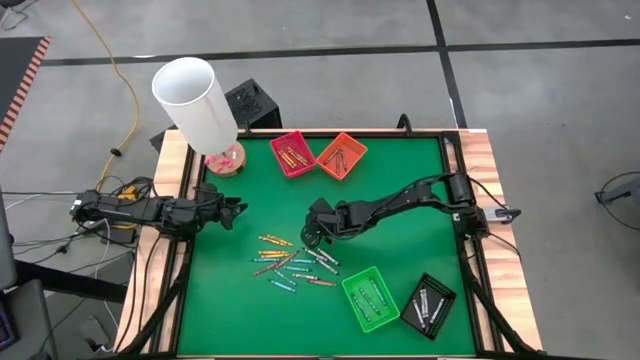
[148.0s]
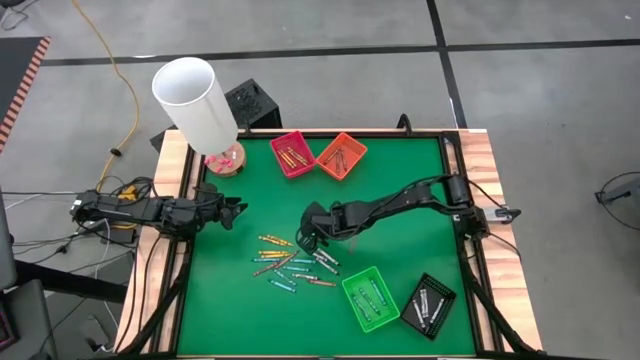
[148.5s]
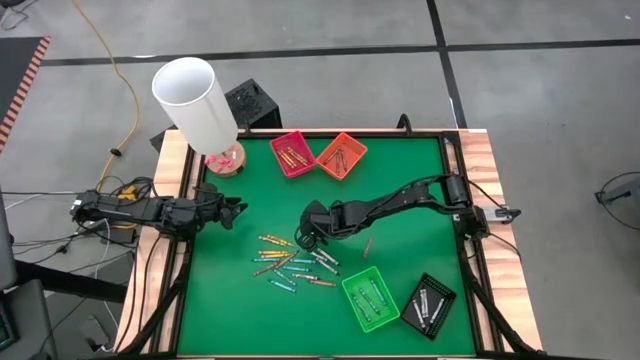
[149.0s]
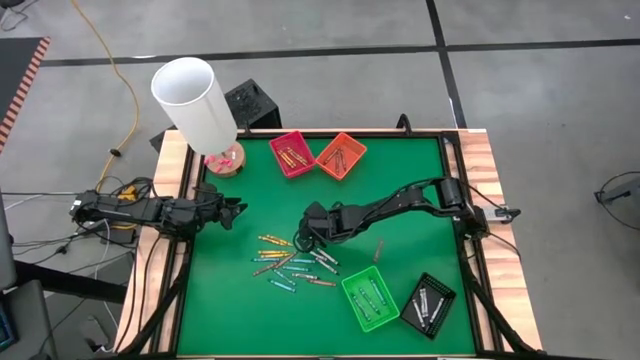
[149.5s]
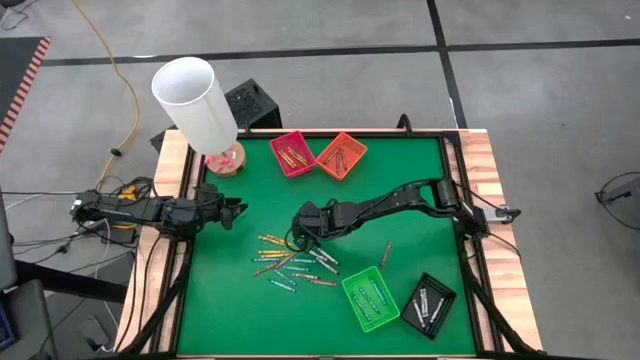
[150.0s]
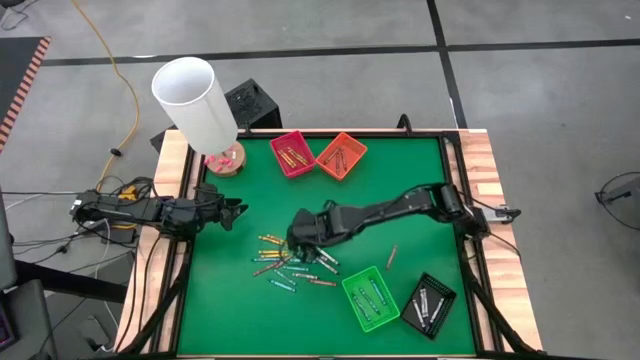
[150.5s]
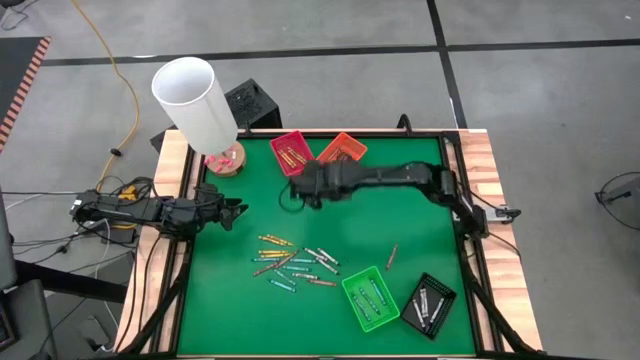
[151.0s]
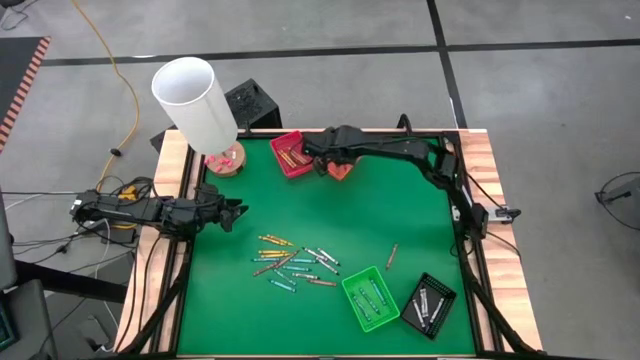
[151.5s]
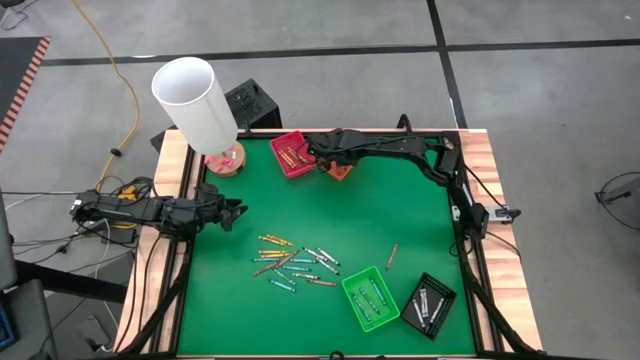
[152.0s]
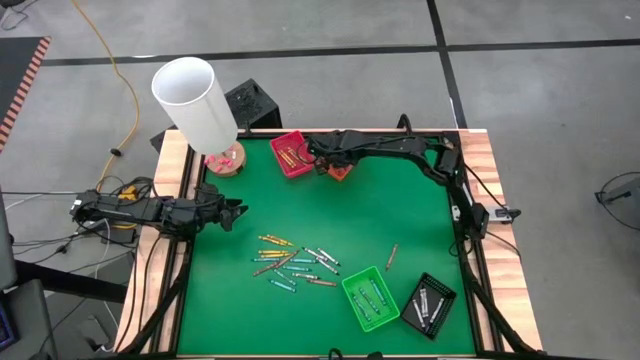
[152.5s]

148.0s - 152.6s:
Task: Sort crayons
Put the brown crayon into the orange bin

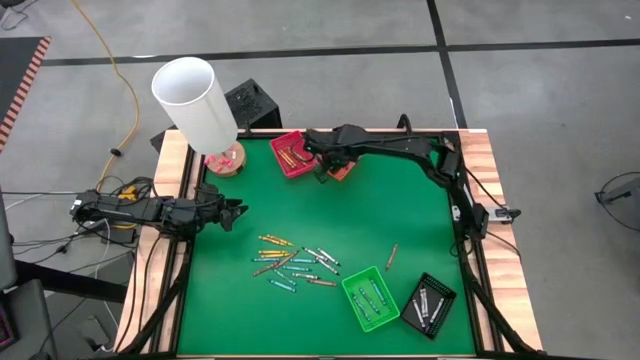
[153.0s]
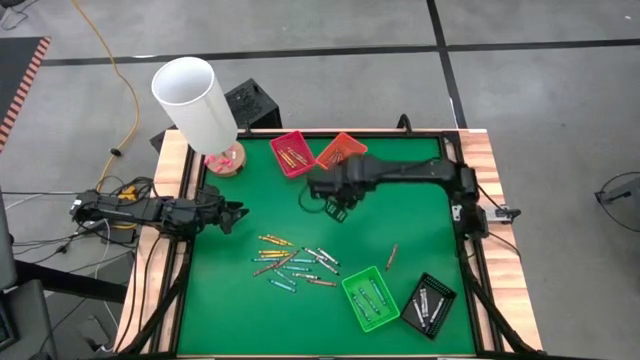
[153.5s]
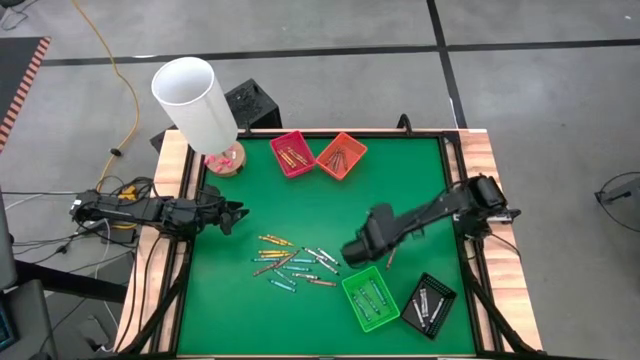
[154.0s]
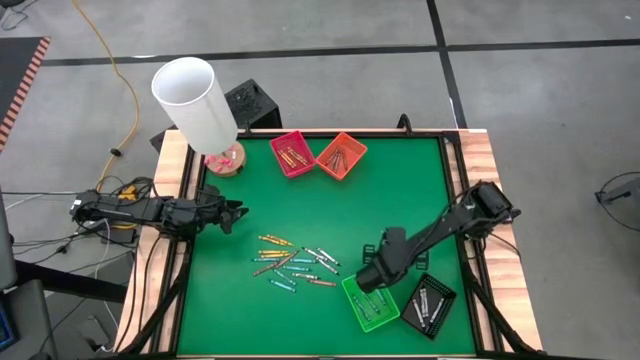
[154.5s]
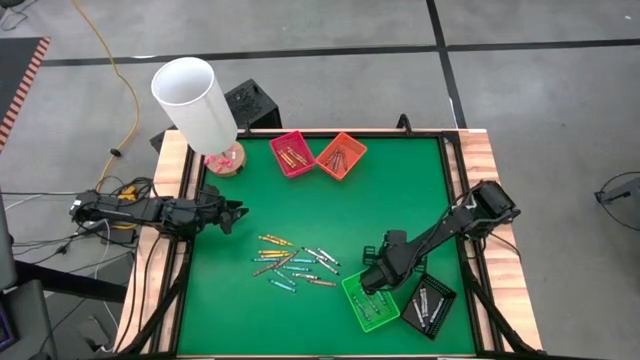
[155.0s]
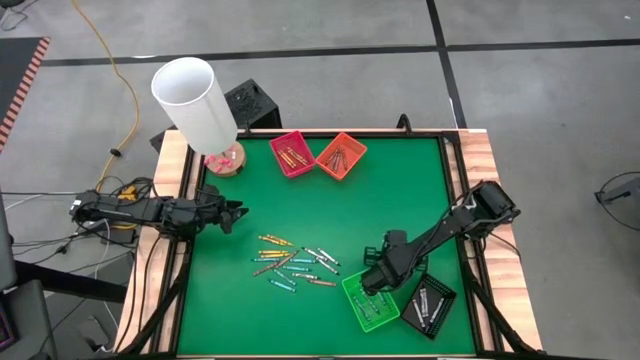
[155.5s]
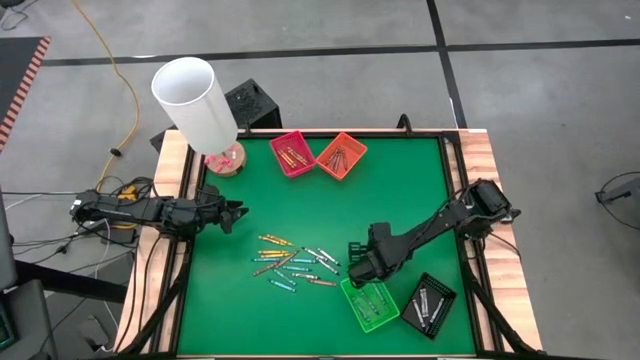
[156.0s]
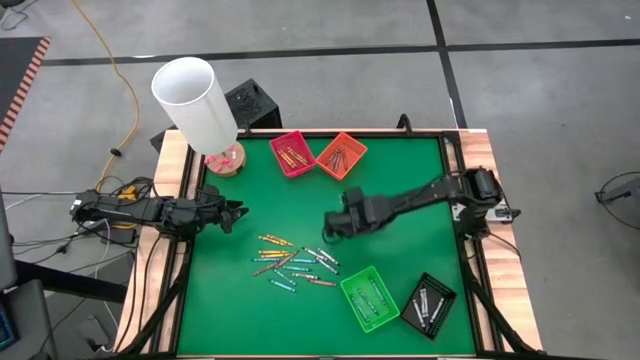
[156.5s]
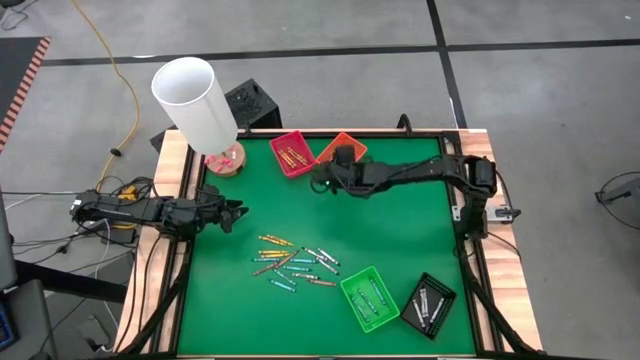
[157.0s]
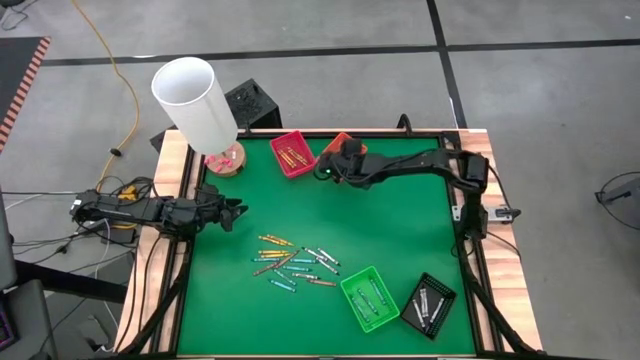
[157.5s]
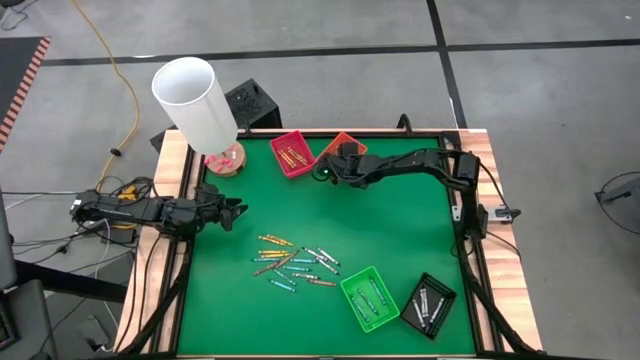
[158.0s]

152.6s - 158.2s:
Put the brown crayon into the orange bin

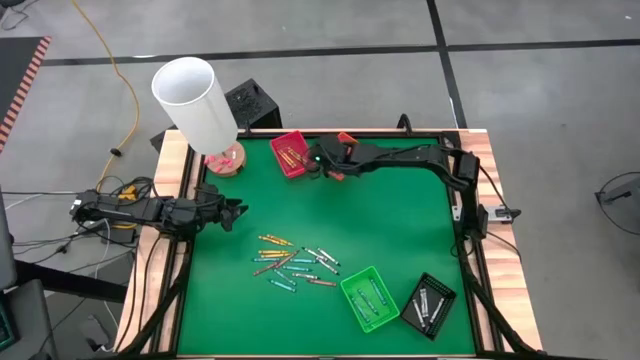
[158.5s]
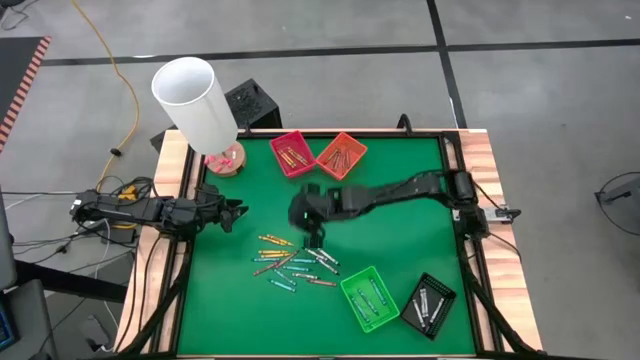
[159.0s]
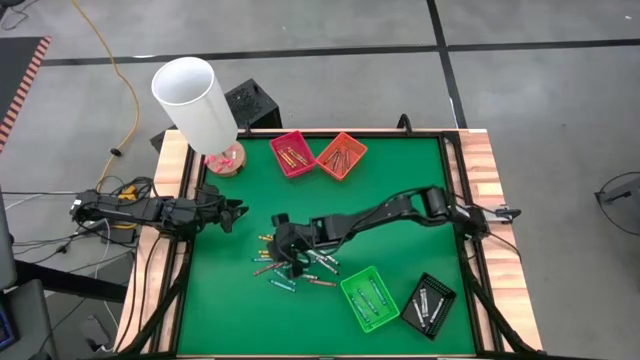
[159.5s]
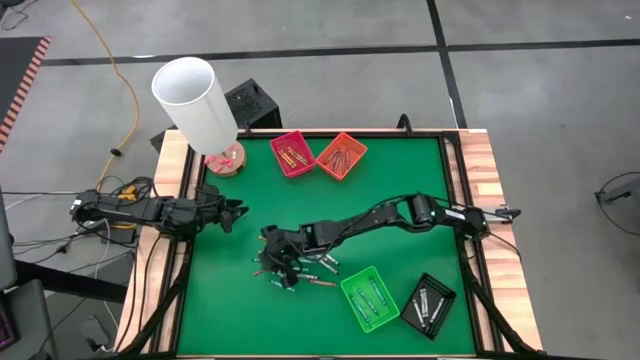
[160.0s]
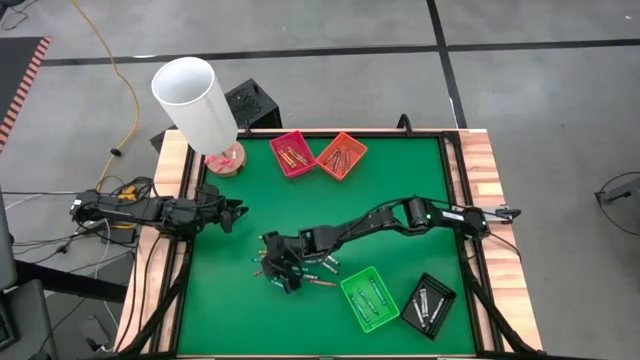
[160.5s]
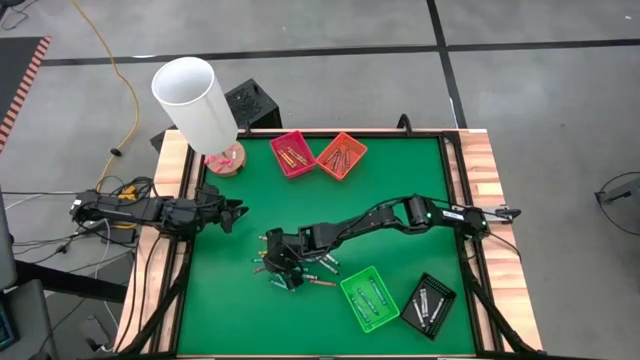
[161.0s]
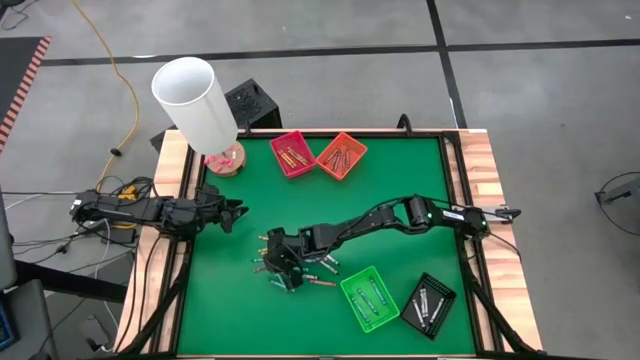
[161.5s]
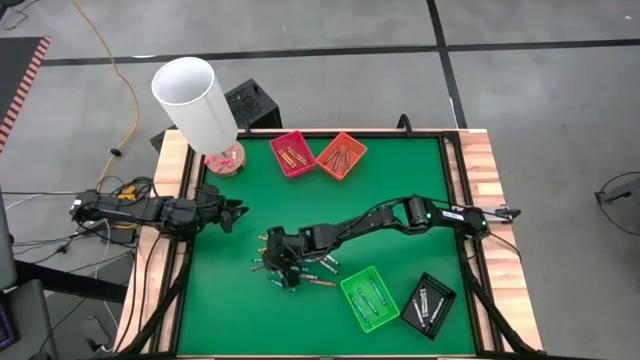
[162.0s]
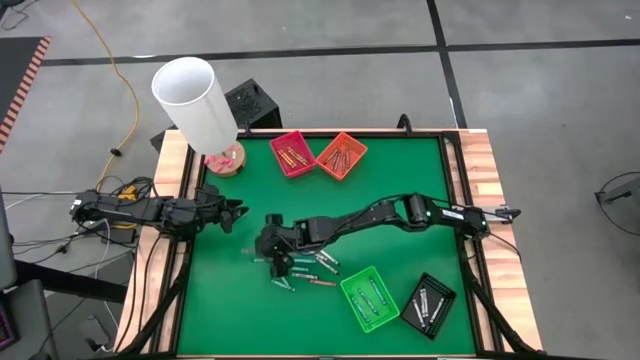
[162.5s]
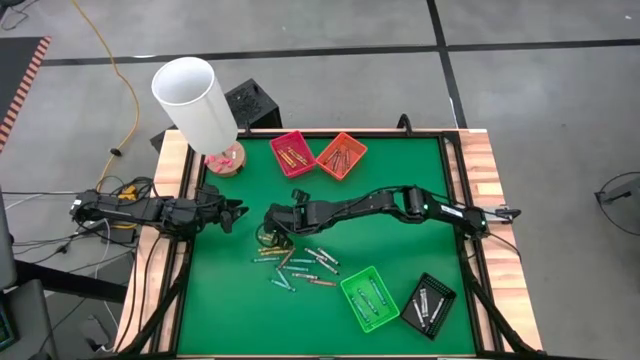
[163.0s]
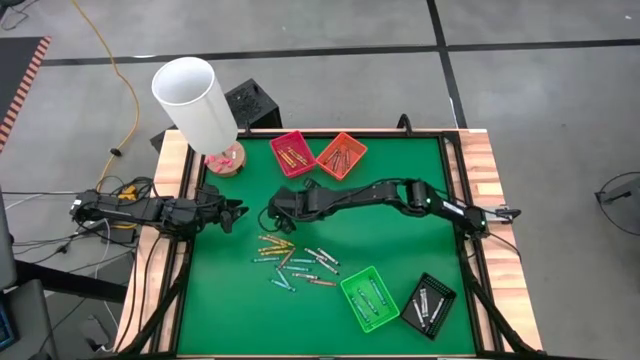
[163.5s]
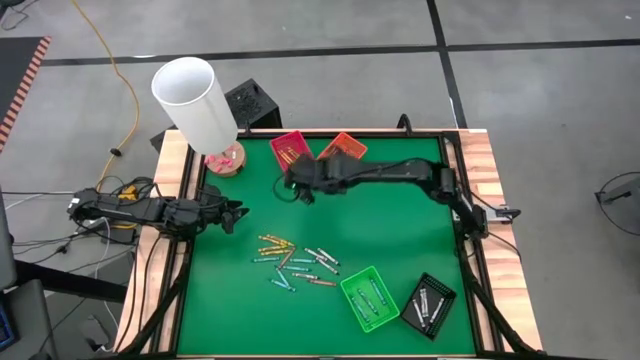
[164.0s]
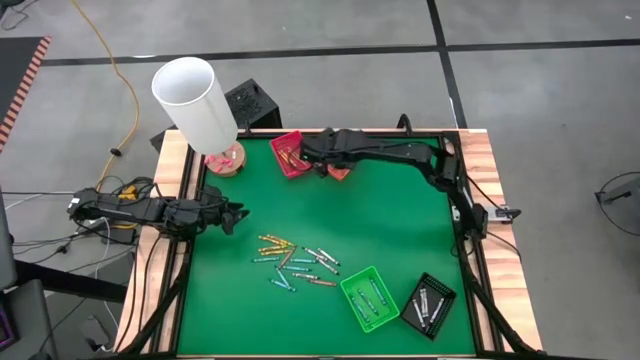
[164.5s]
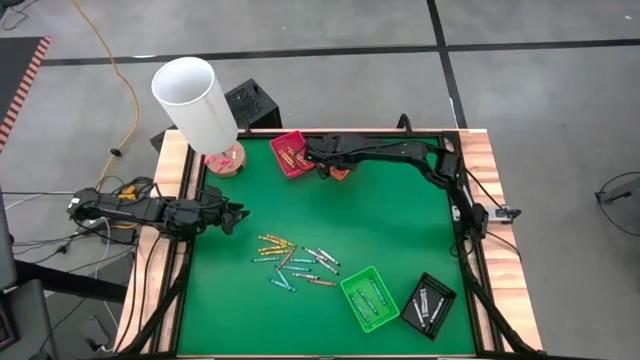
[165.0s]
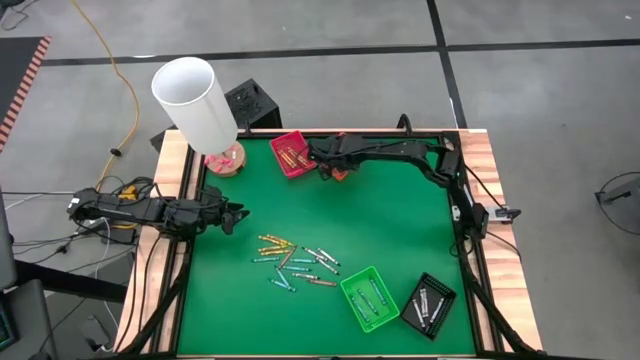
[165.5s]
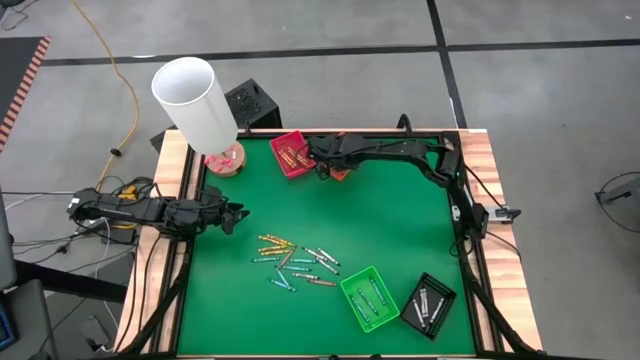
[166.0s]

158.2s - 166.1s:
Put the brown crayon into the orange bin

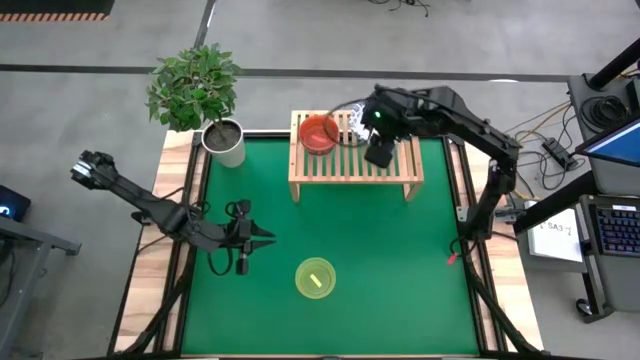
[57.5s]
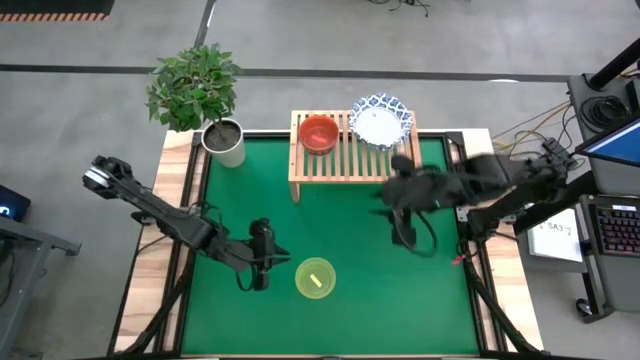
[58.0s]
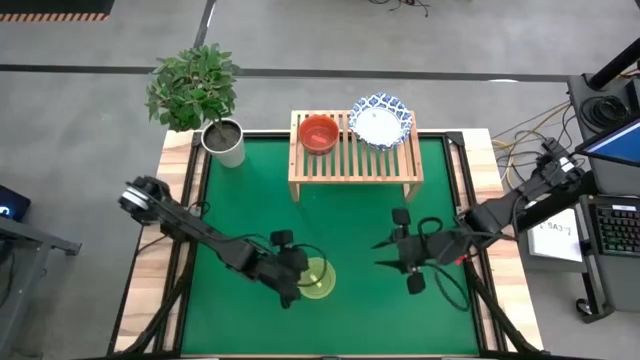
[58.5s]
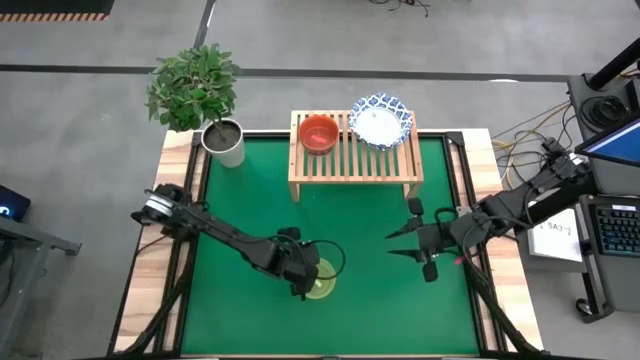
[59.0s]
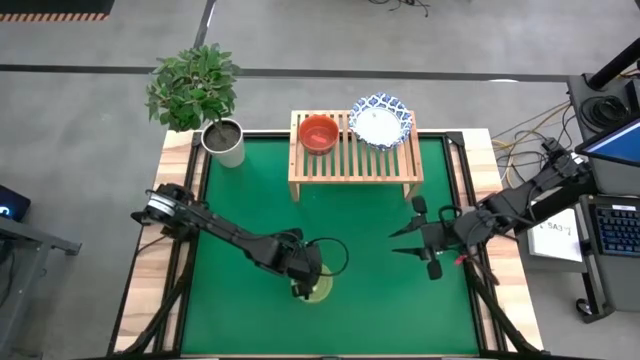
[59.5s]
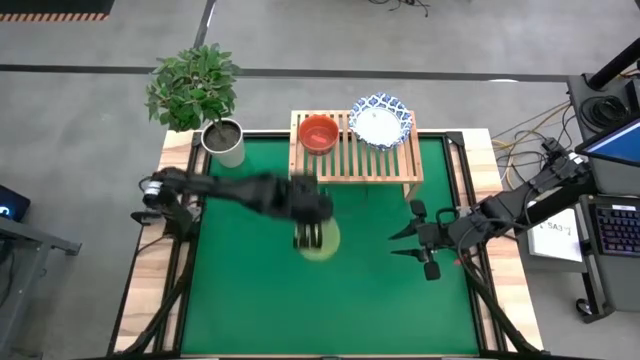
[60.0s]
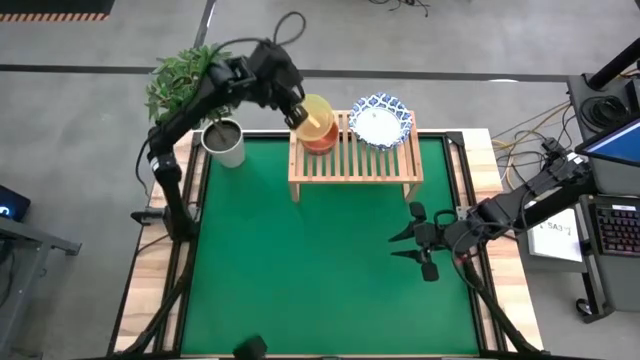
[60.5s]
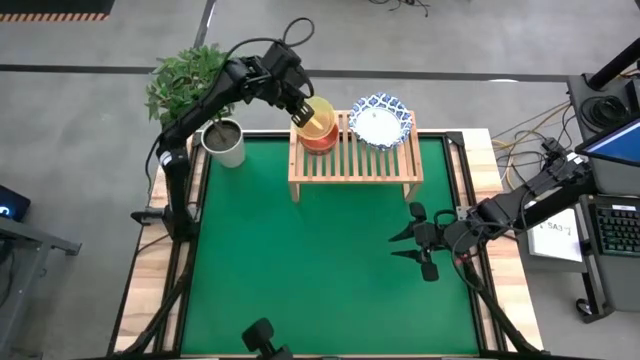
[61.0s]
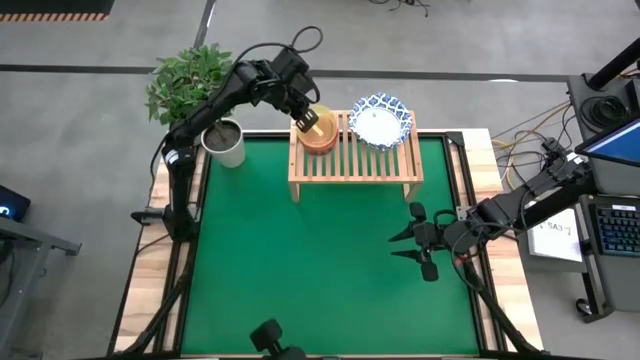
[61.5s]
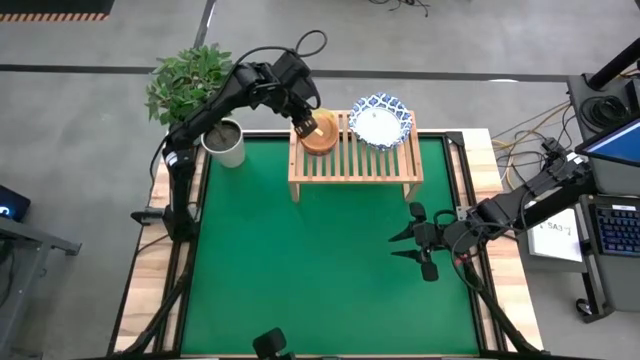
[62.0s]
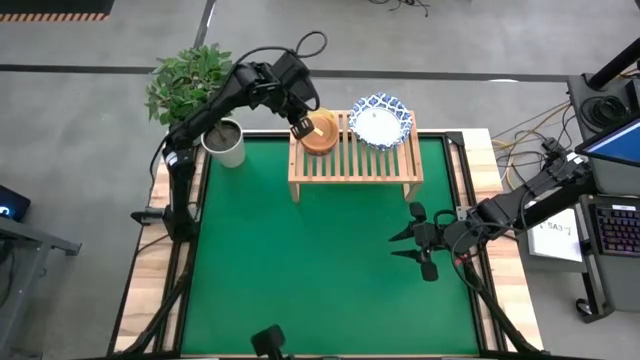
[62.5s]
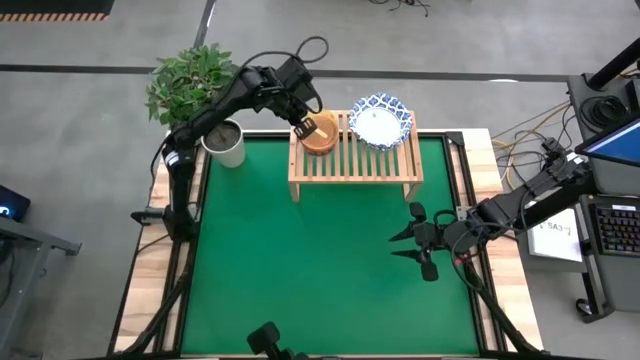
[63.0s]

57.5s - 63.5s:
Task: Place and stack bowls onto a shelf
Stack the yellow bowl on top of the orange bowl on the shelf
